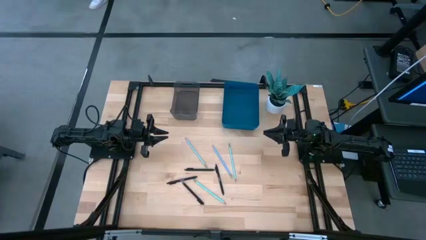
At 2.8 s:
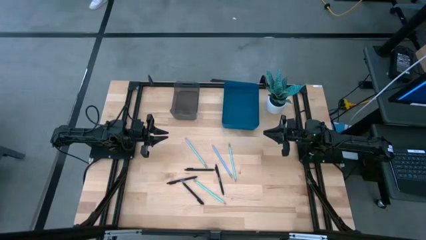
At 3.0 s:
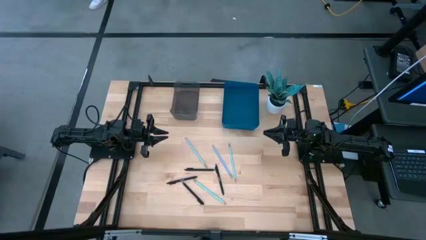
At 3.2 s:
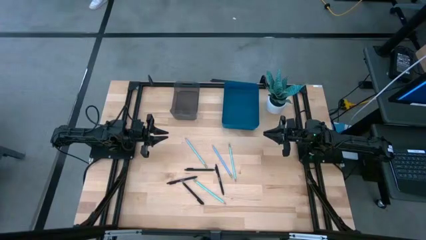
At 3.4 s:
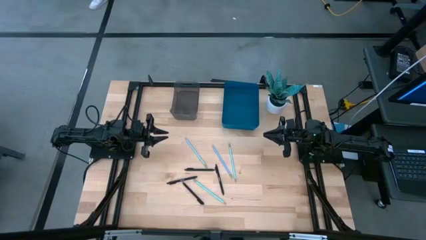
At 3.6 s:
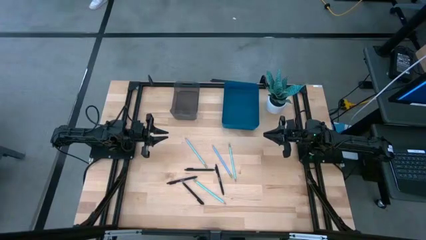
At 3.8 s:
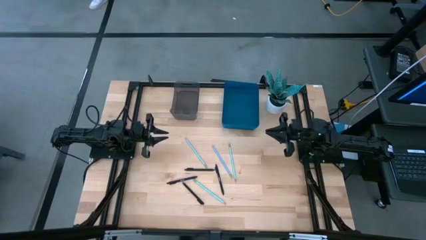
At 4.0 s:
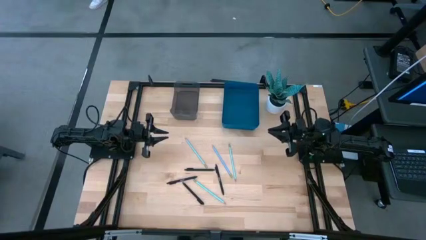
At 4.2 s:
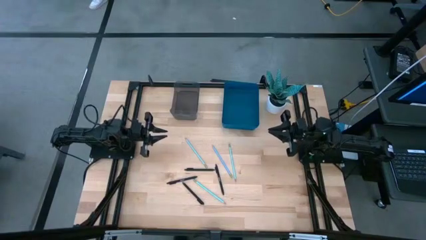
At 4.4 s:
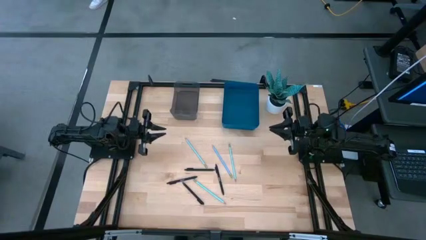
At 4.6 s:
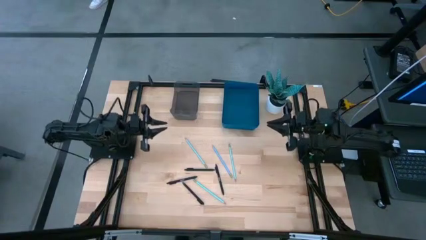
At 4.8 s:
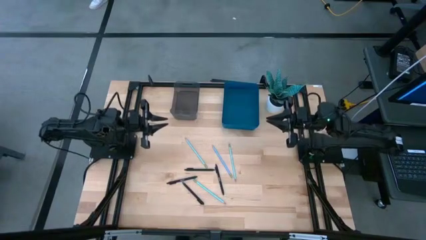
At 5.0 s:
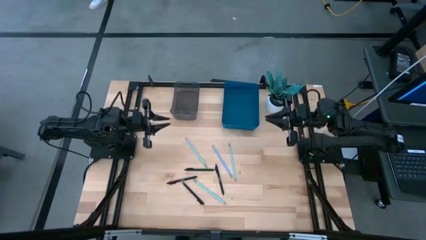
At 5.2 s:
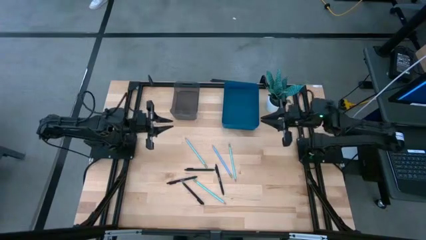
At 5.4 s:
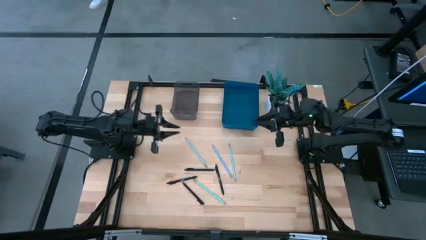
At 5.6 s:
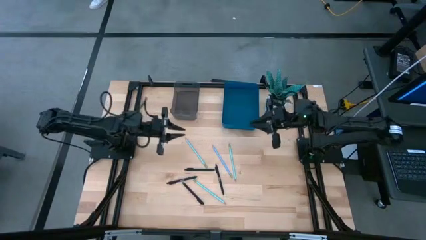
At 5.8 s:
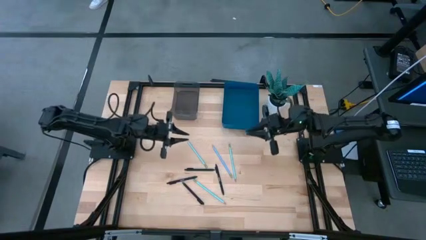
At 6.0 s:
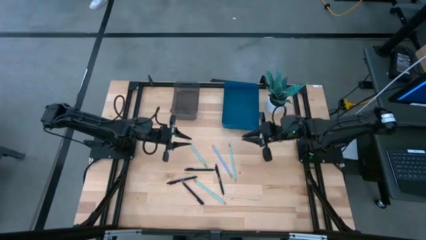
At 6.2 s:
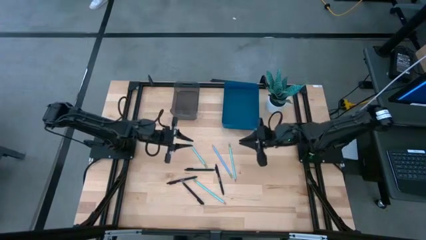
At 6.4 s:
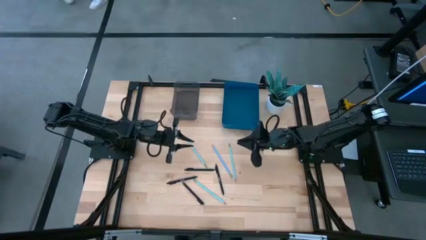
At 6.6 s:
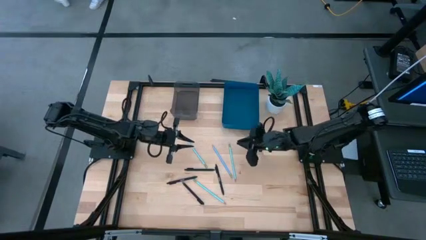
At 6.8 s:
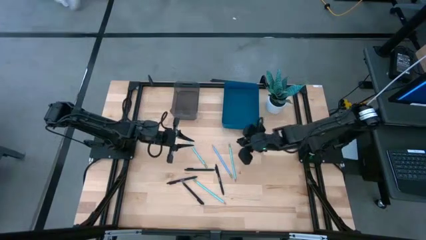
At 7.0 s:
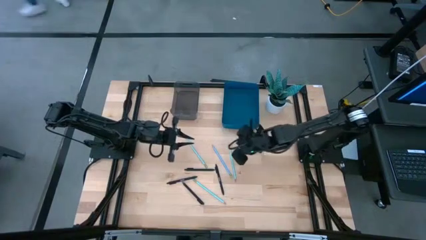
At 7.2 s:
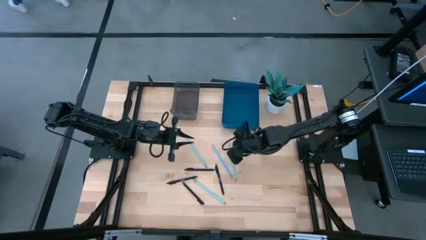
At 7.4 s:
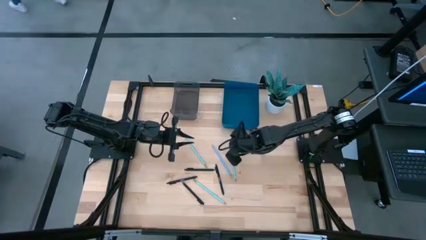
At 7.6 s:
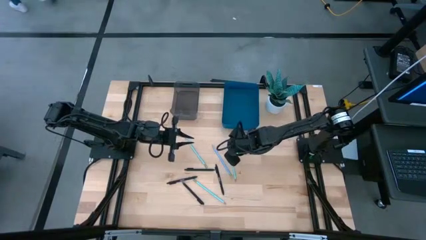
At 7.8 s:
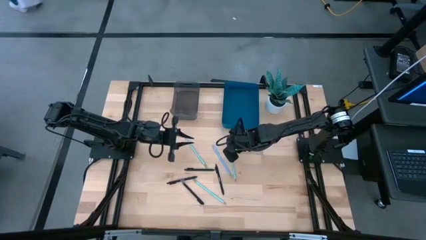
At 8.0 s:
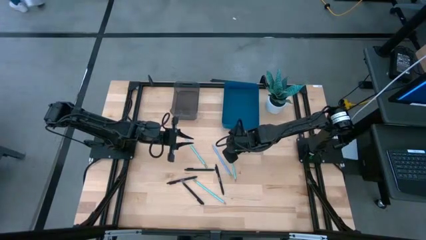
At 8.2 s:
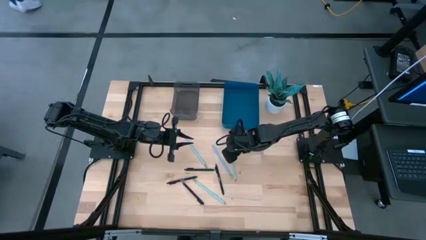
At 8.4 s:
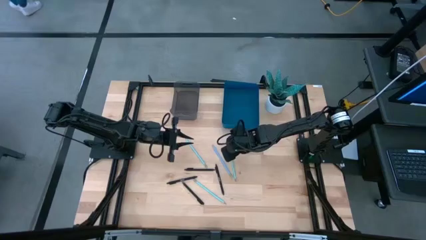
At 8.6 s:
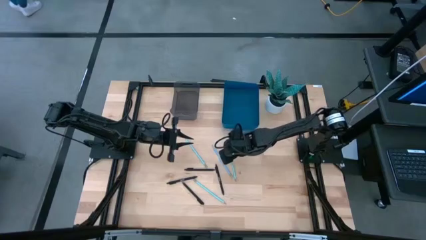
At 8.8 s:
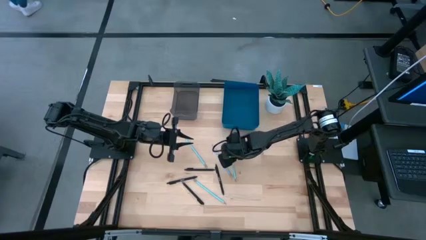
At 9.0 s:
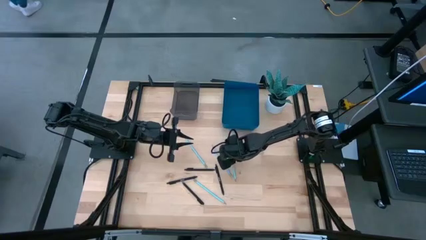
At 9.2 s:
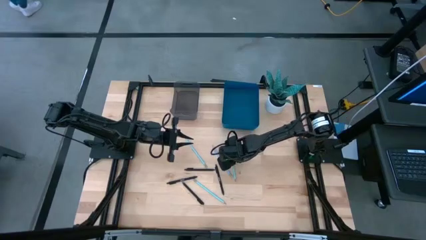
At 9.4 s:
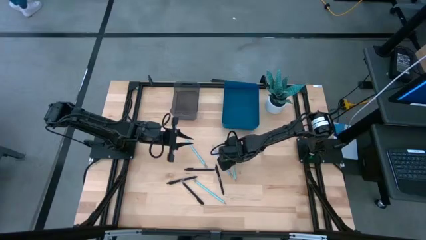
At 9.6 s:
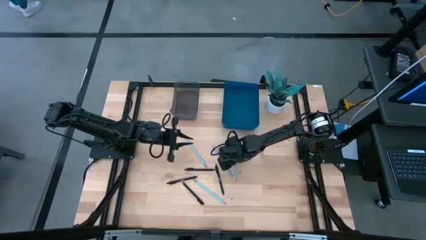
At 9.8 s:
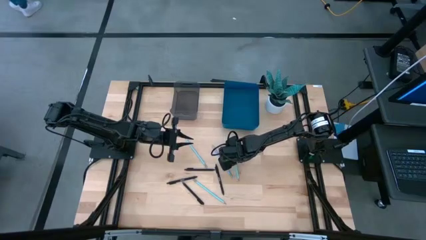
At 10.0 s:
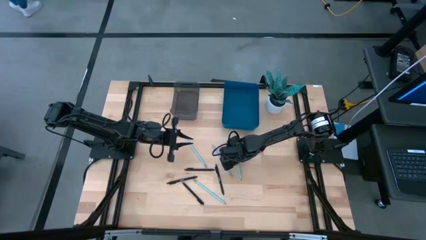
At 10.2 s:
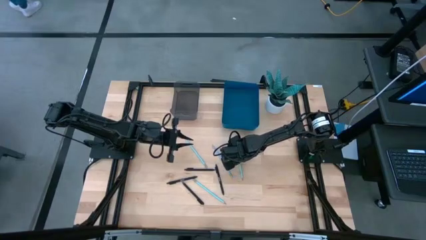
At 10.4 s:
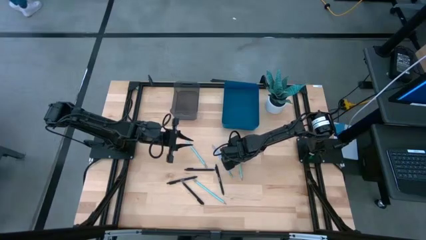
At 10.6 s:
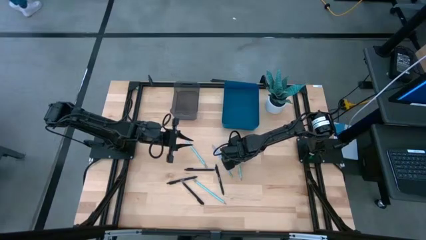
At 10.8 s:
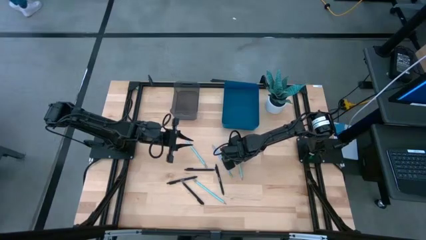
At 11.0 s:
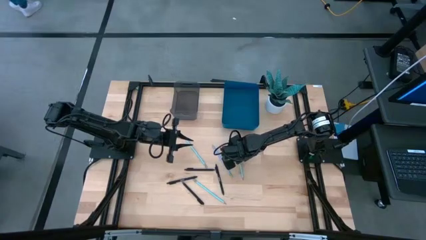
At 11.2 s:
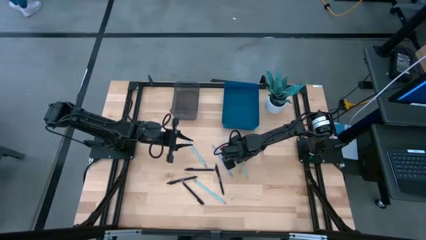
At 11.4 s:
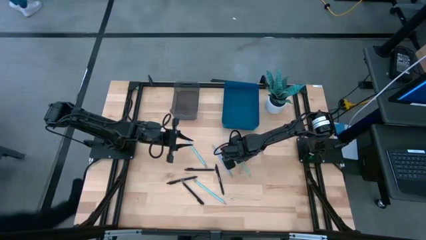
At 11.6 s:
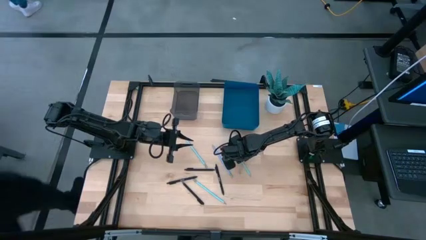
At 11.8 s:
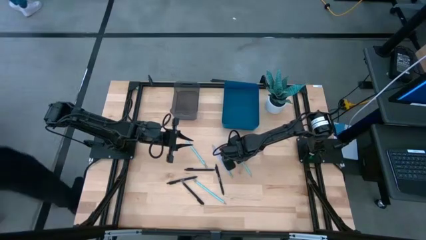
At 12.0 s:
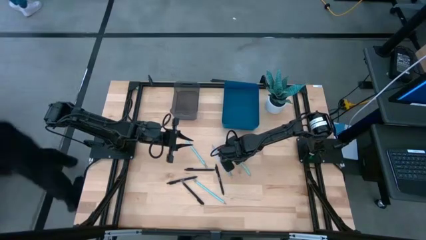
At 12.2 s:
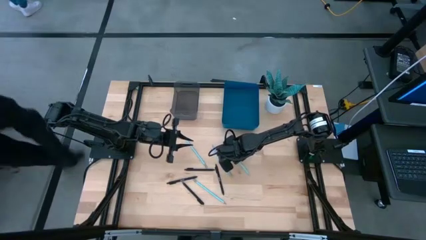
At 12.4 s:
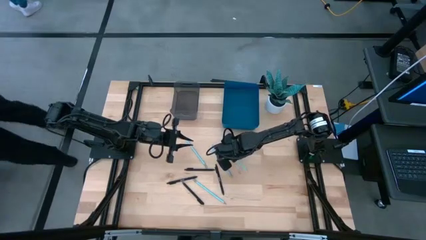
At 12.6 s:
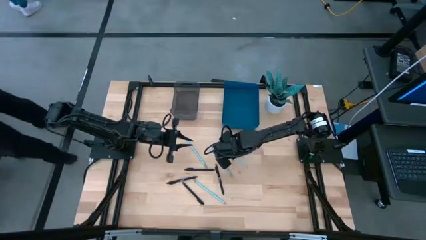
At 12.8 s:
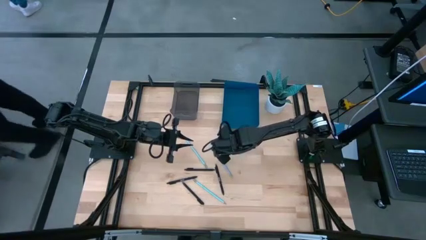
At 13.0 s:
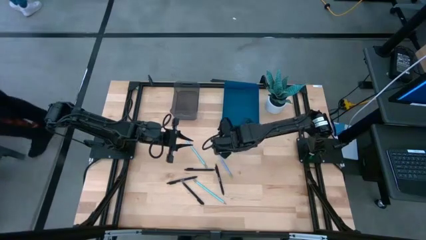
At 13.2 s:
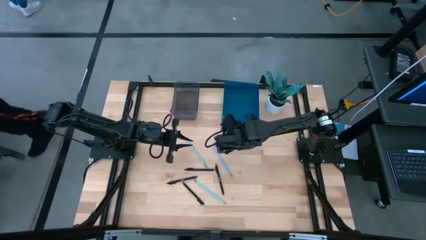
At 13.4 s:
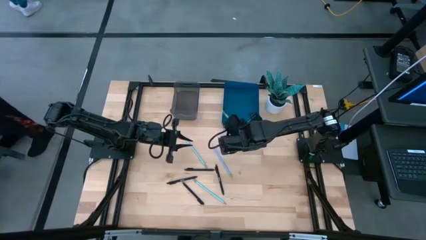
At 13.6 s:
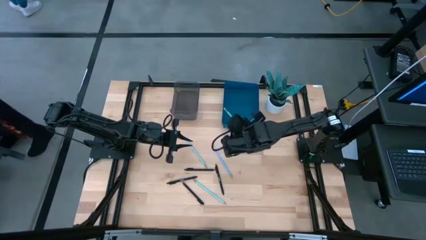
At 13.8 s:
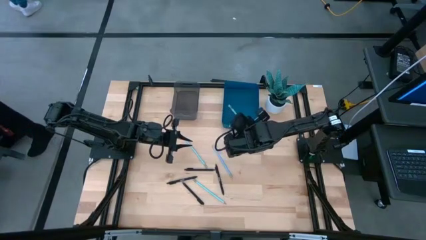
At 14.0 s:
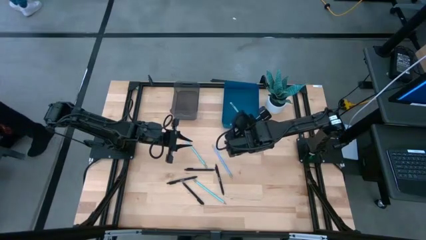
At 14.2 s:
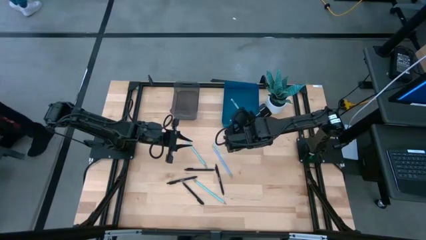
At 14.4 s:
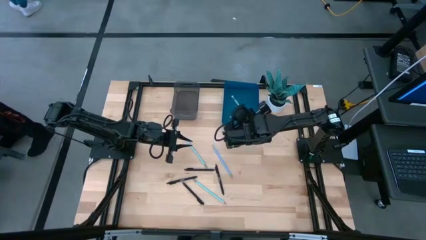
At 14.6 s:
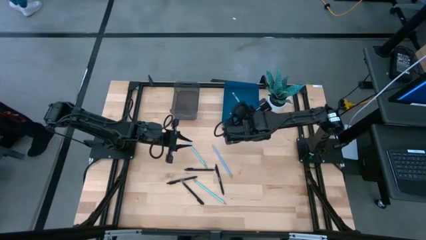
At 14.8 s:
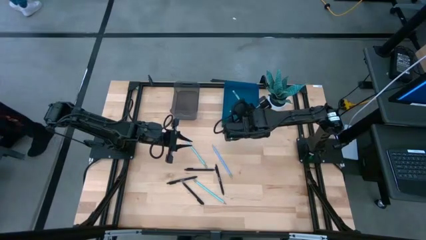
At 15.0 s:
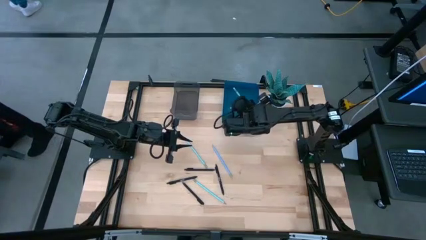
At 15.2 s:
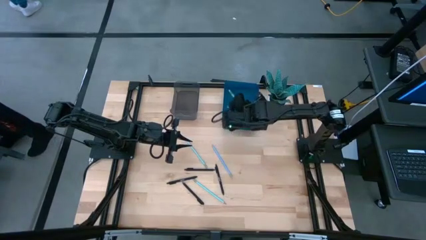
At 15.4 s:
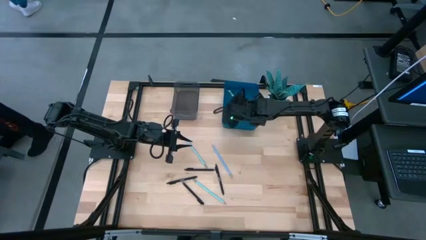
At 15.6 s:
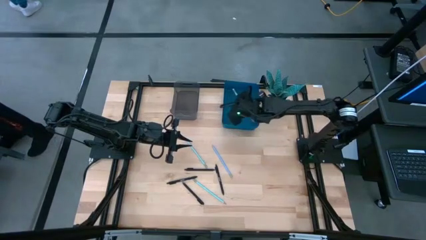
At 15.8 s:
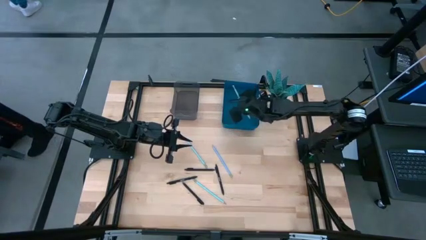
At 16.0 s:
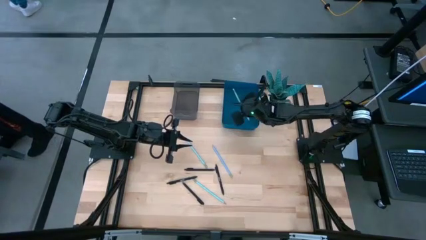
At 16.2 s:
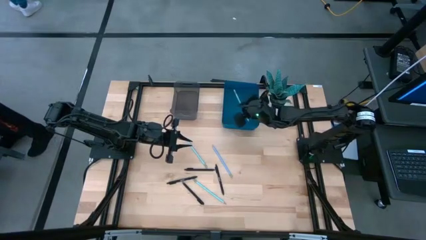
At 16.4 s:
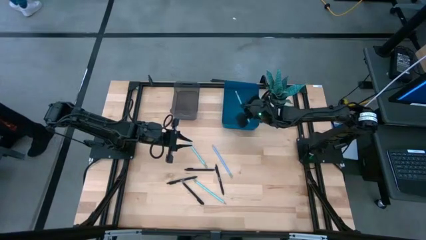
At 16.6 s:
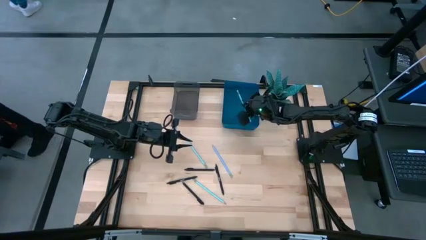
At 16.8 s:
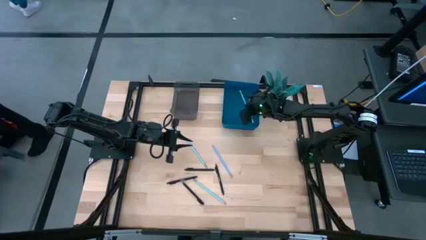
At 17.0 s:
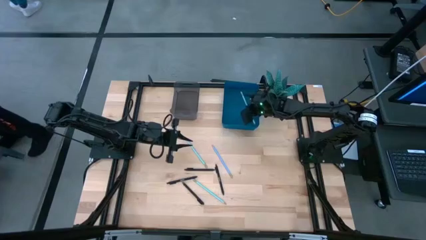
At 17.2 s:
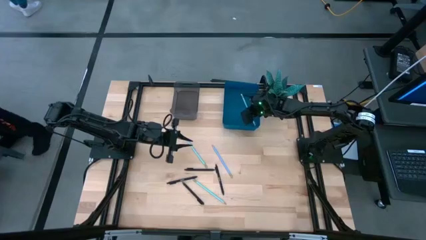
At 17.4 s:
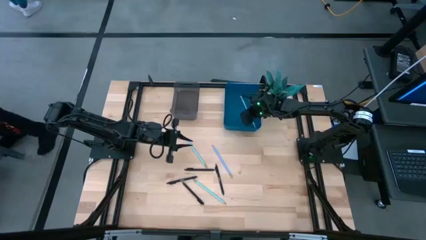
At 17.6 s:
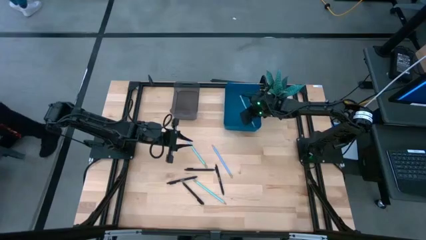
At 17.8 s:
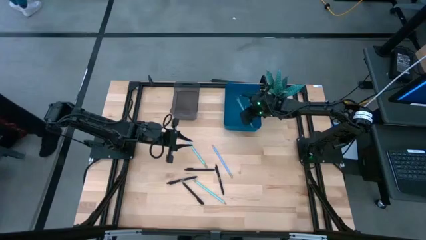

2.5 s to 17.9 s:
Task: Sort pens & pencils
Put the light blue pencil into the blue bin
